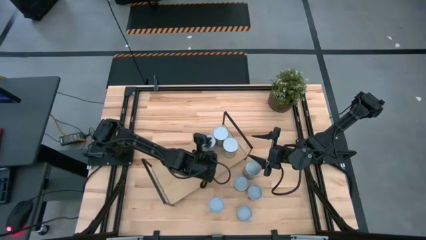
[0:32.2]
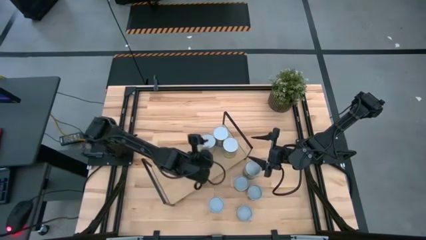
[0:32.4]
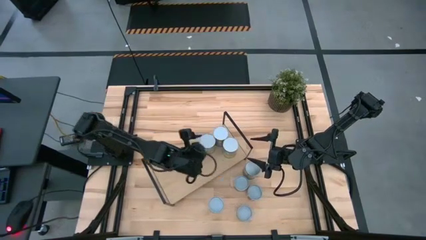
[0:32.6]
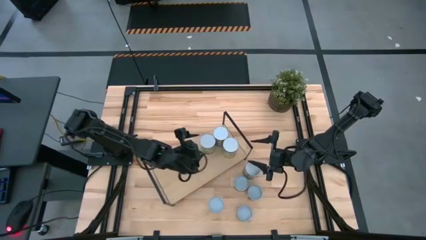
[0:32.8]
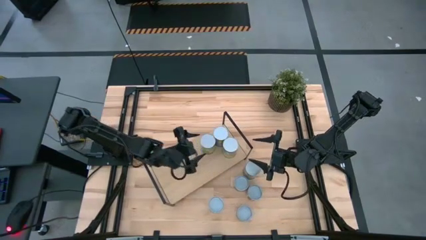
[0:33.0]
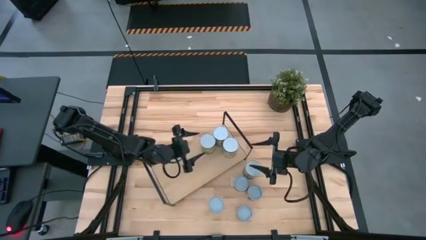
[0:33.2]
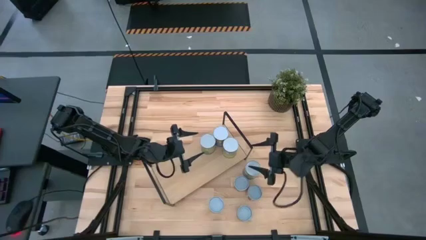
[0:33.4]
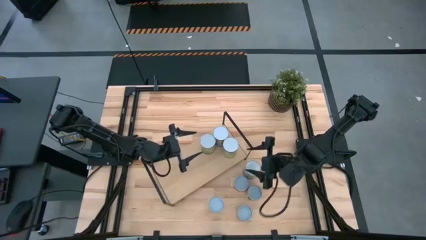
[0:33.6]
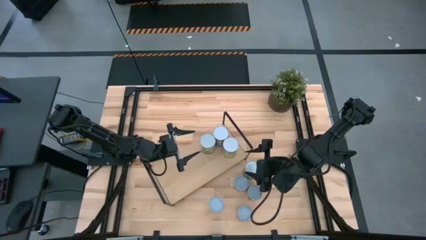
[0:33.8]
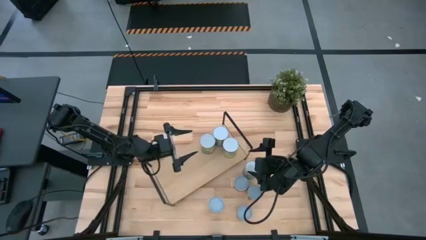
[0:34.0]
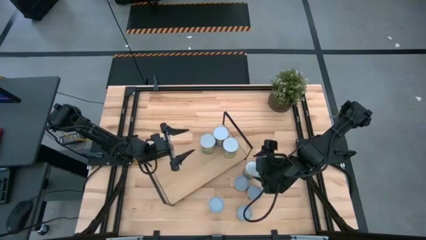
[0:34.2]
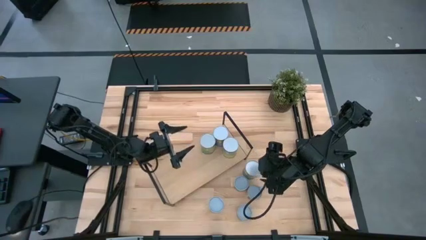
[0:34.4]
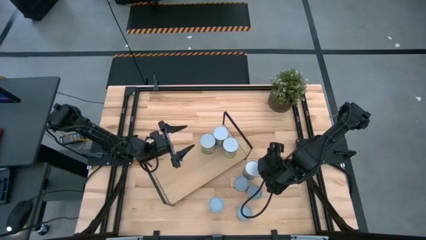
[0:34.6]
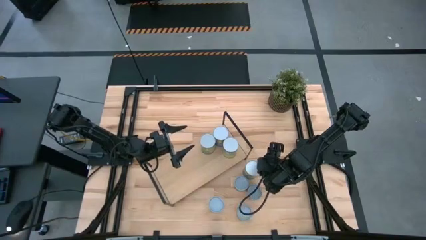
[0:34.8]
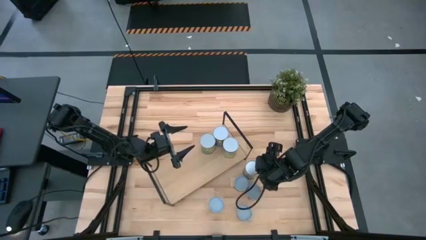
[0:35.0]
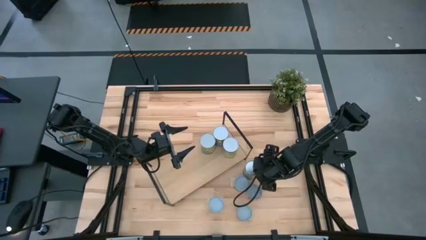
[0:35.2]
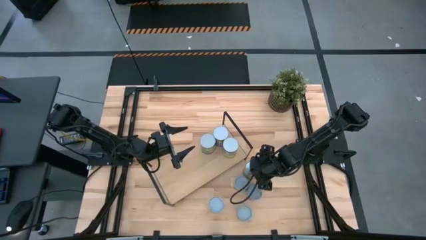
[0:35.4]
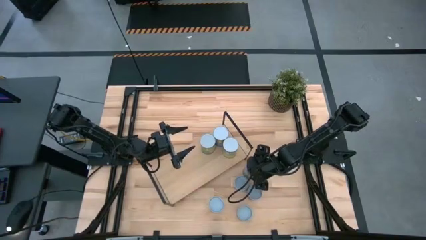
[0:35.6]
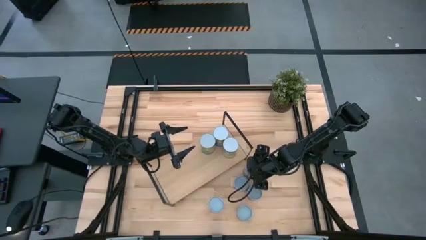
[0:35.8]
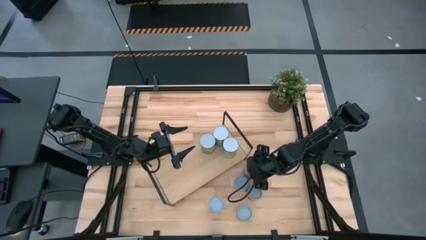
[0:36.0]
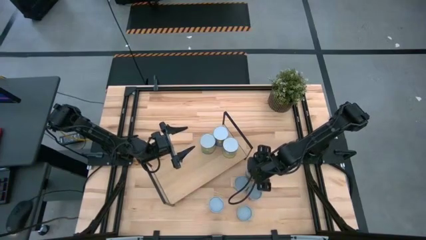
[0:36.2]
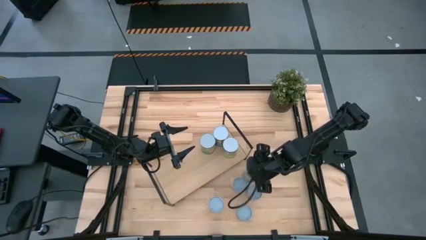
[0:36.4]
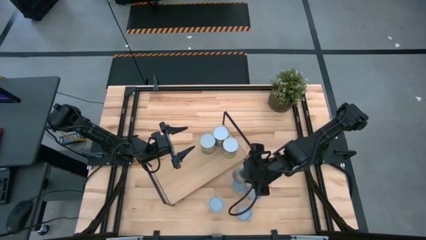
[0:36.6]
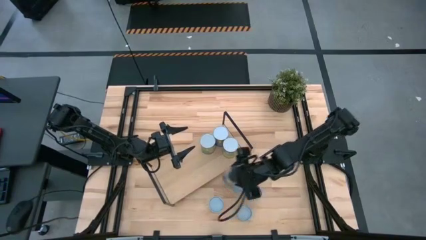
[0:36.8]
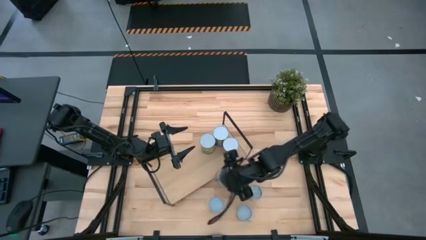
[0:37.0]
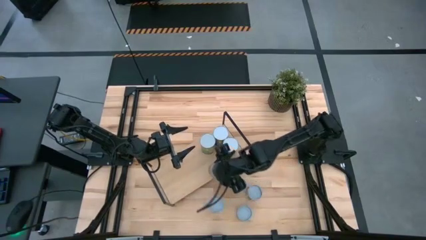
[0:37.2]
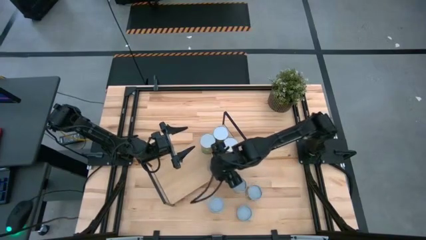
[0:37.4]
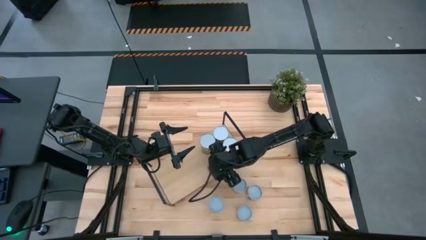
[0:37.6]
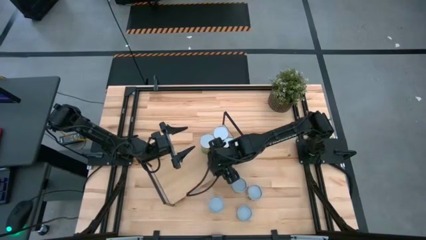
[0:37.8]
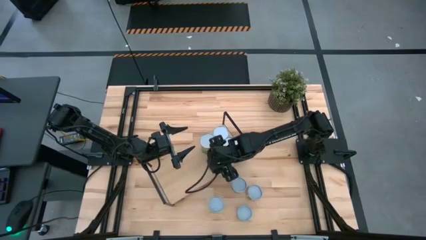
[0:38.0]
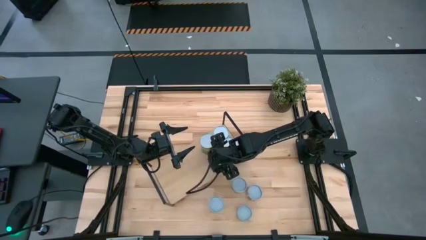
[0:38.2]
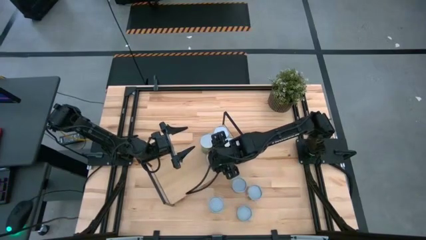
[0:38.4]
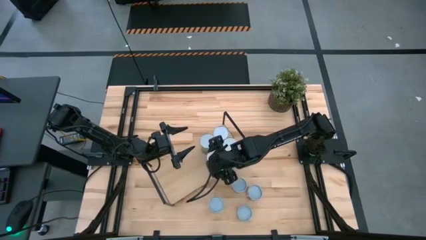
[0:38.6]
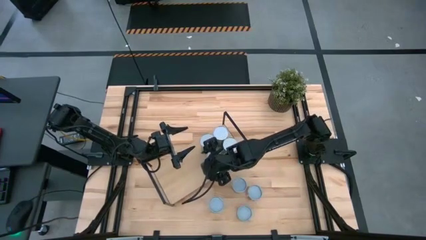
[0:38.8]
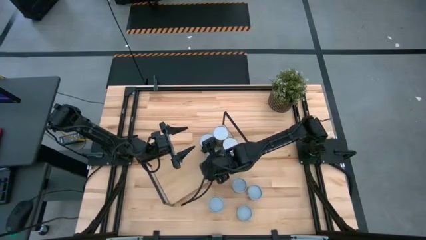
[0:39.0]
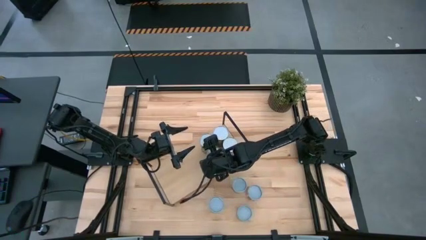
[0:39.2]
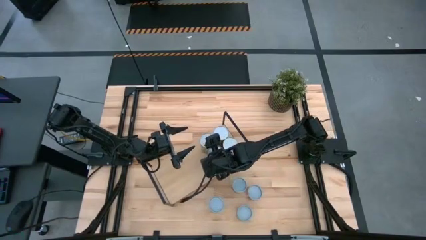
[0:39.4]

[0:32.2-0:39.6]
Task: Pick and place cans onto a shelf
Put the large canned peas on the shelf

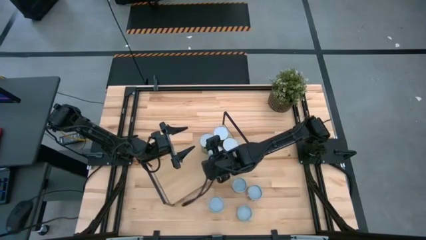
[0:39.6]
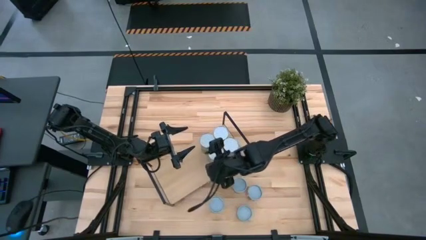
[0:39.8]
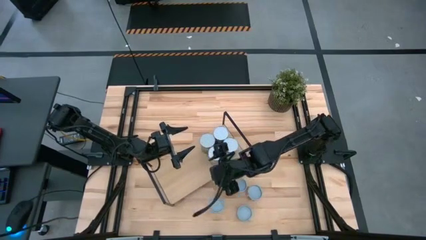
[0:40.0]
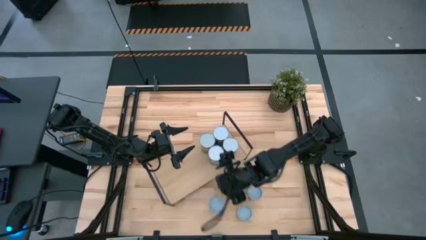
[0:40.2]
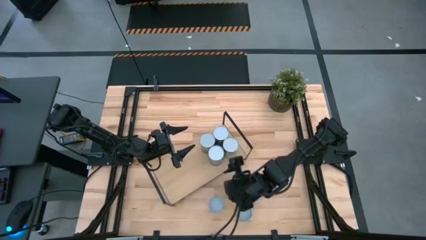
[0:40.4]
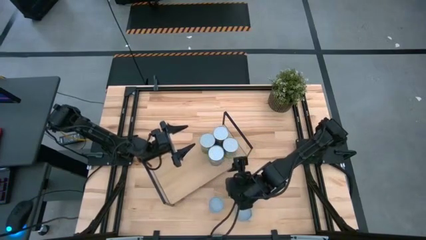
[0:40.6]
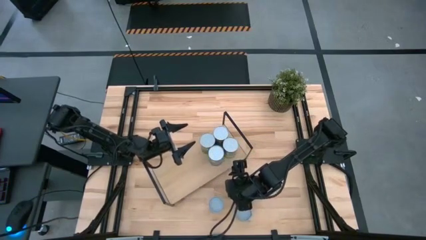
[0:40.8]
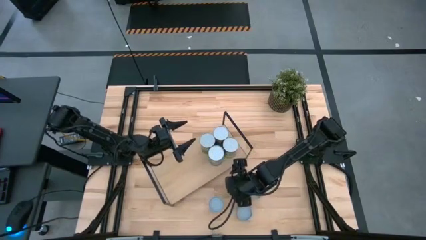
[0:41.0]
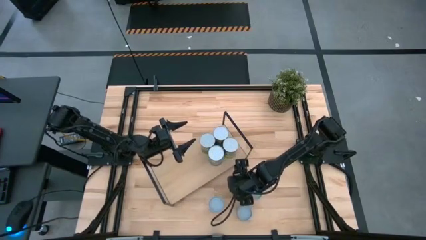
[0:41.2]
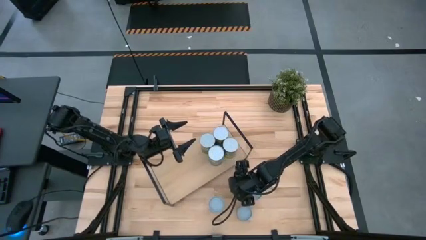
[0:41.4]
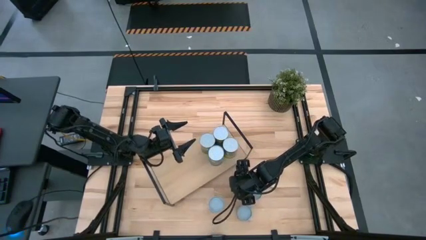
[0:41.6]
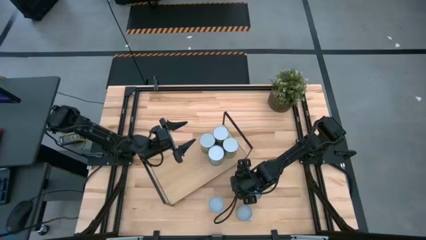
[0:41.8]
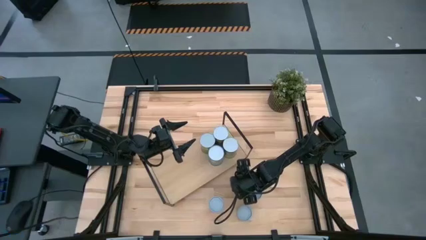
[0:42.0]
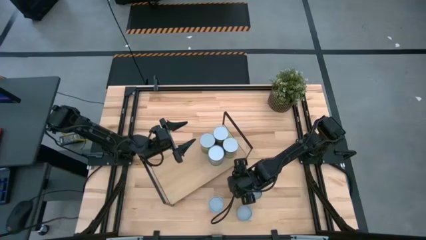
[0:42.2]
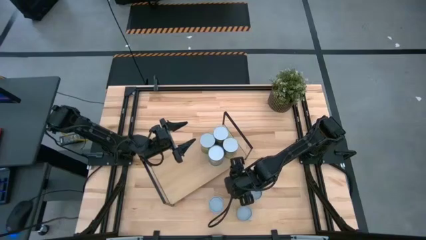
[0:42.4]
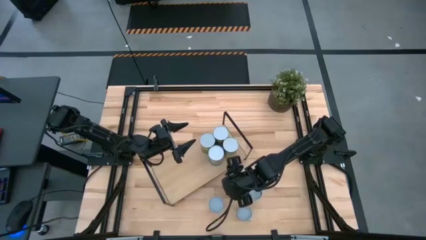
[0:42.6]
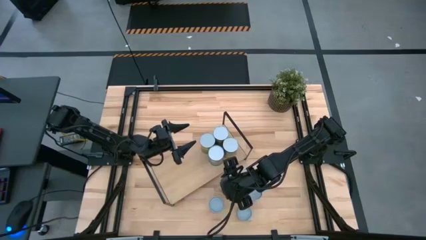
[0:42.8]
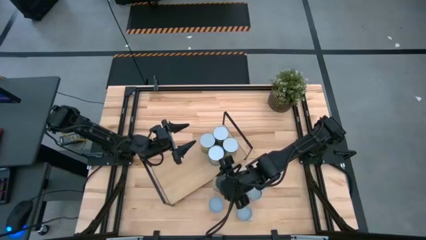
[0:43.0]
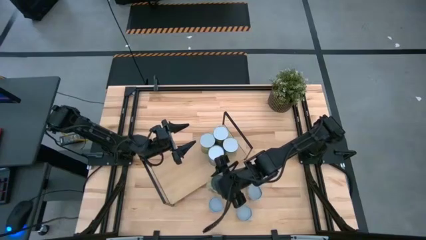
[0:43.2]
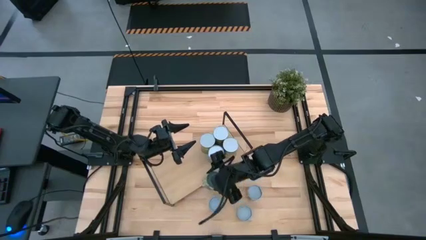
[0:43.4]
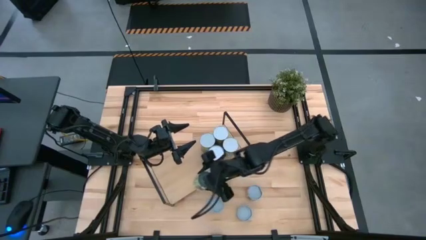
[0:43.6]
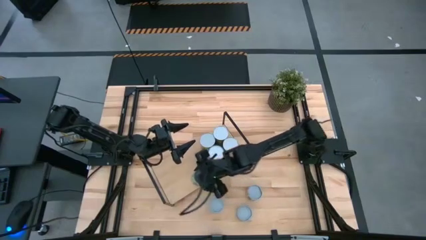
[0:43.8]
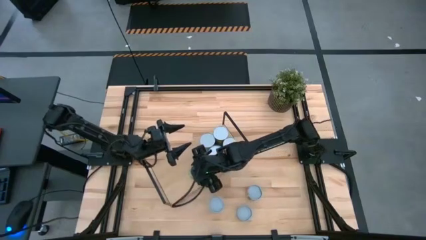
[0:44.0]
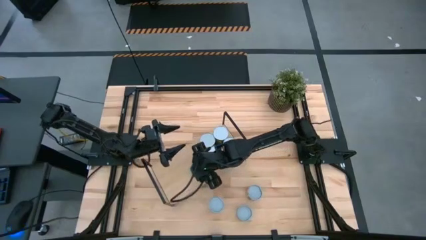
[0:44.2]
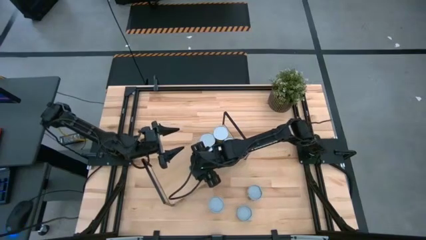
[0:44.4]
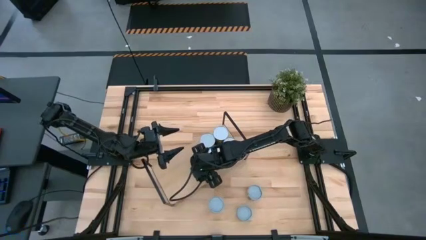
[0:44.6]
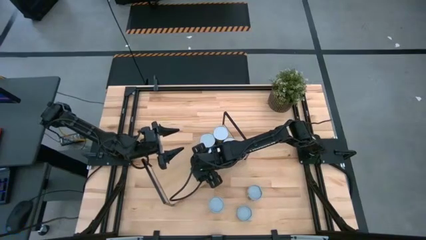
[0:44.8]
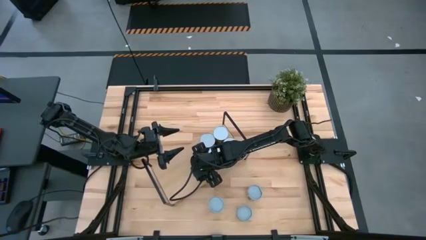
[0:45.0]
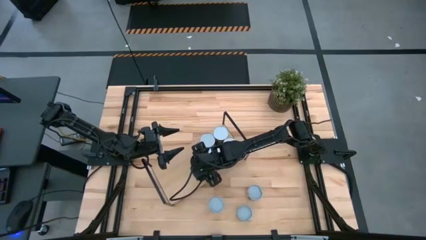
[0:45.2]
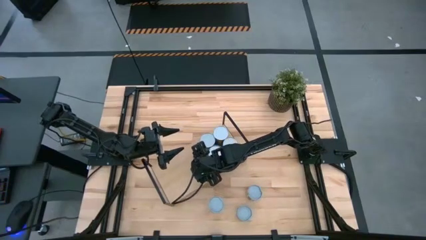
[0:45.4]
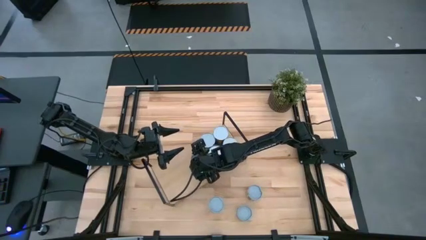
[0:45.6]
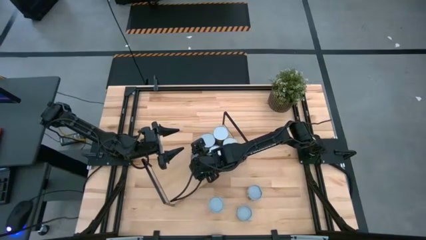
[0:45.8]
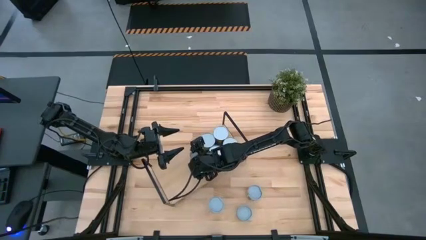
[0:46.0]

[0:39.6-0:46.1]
Put the small canned peas on the shelf
